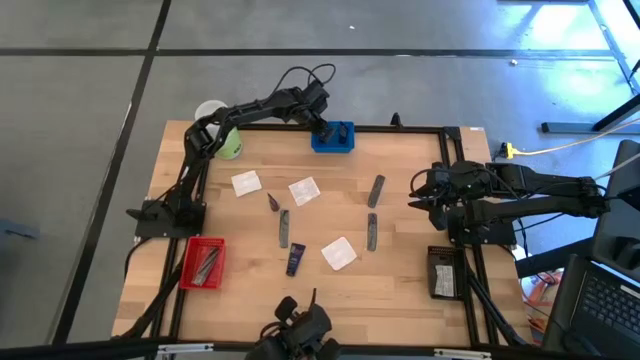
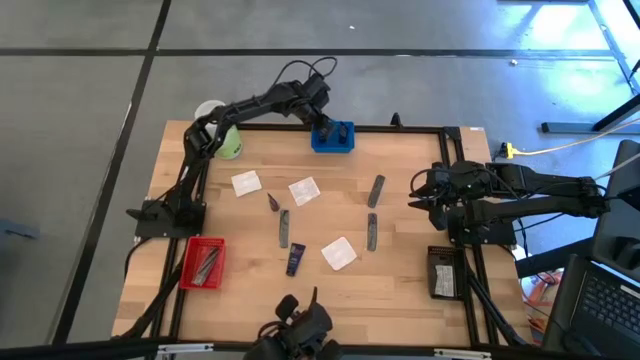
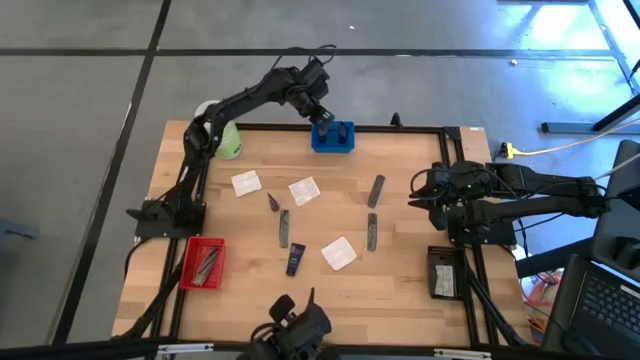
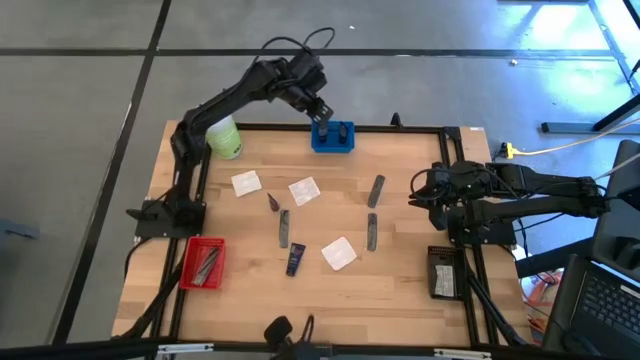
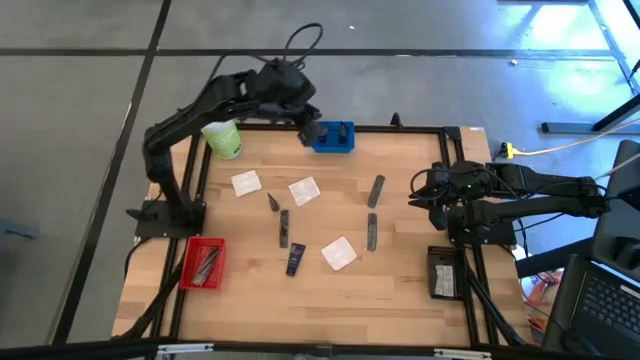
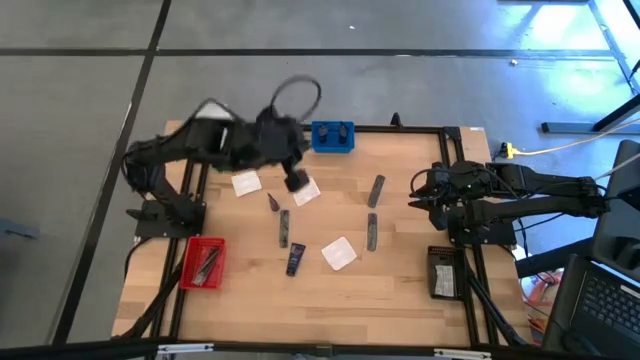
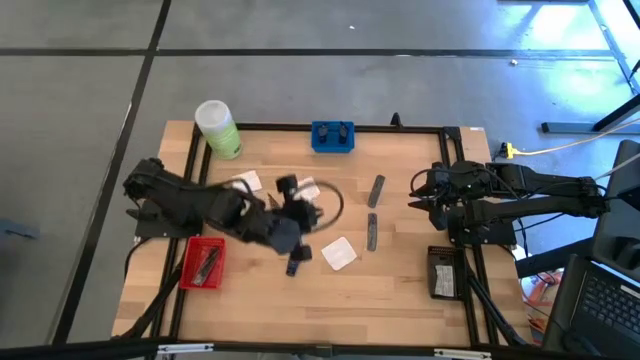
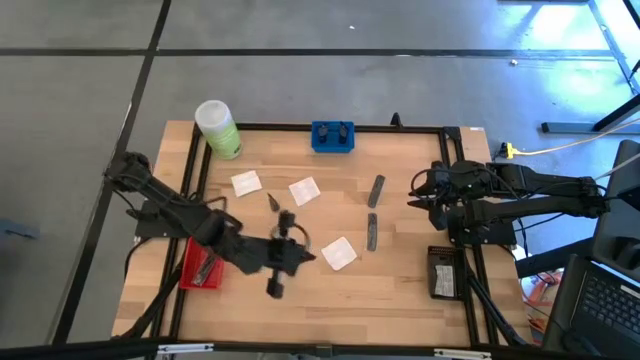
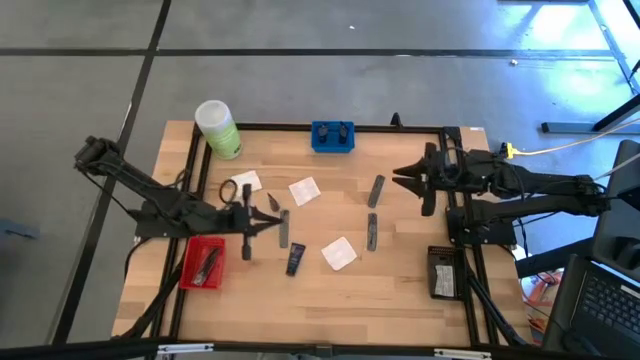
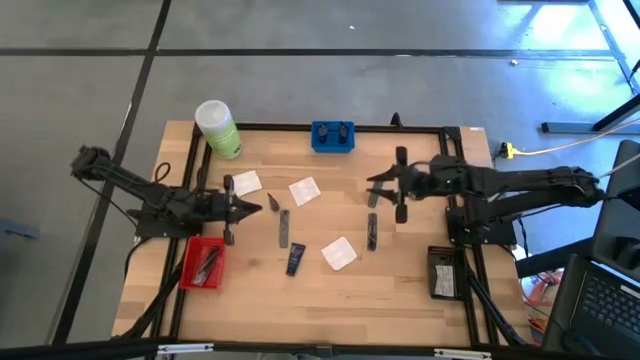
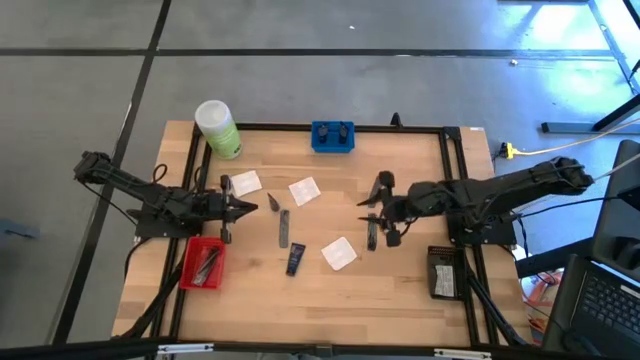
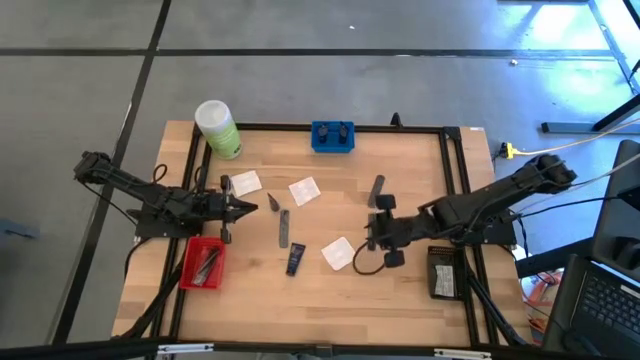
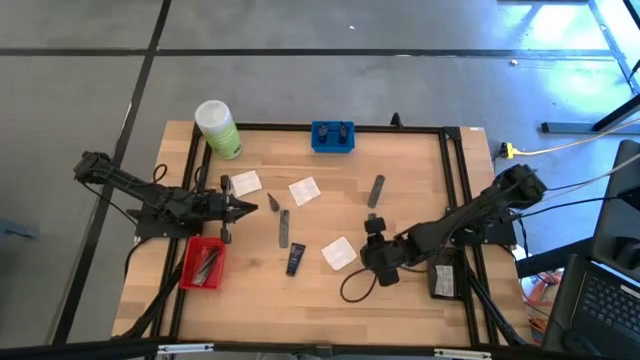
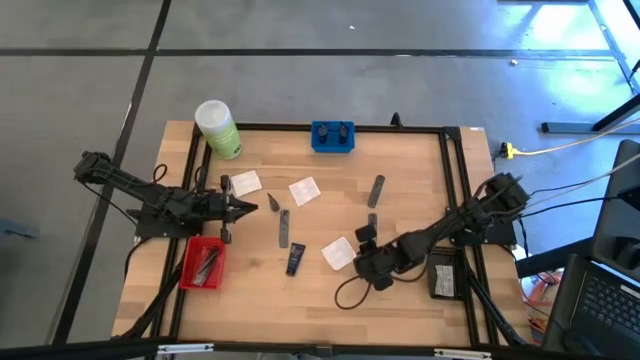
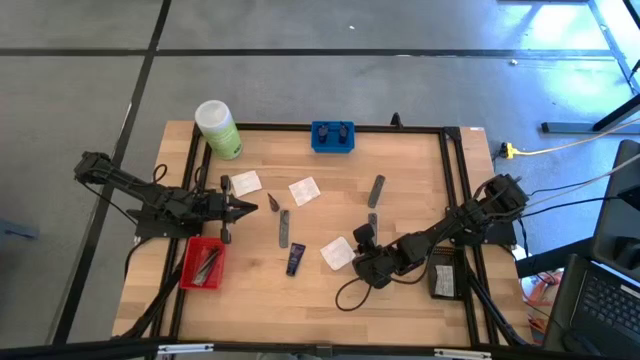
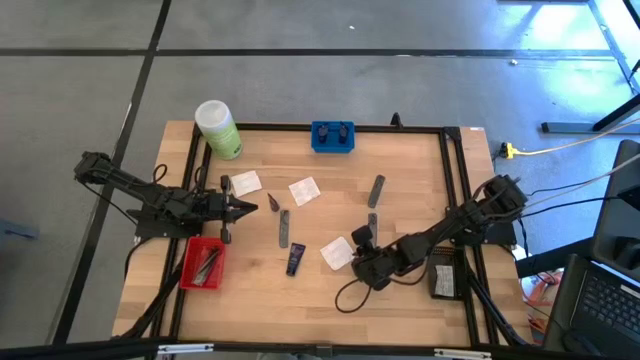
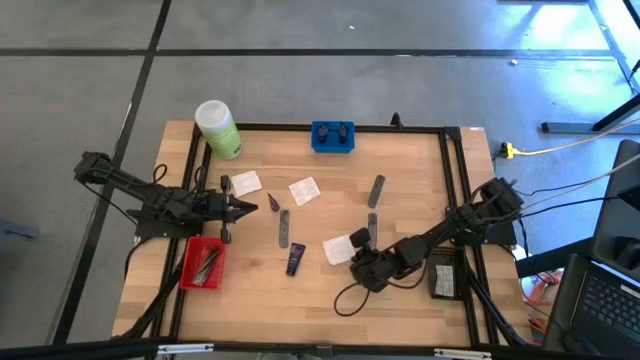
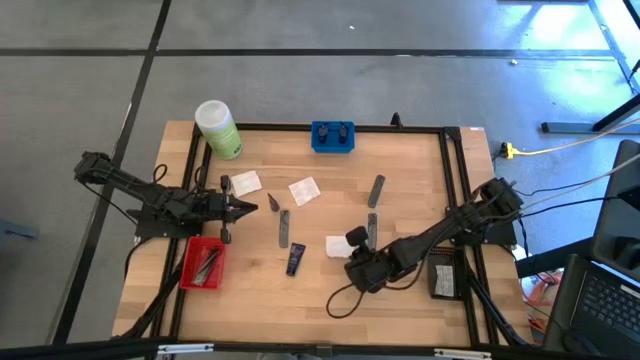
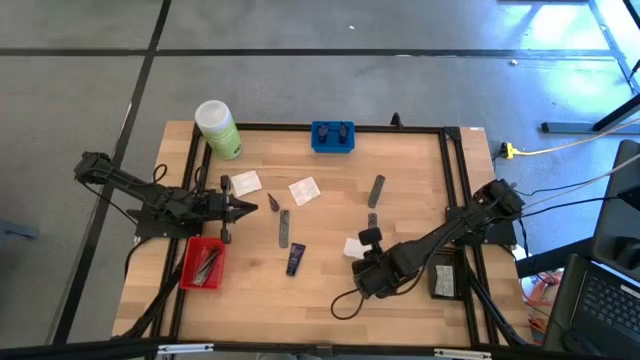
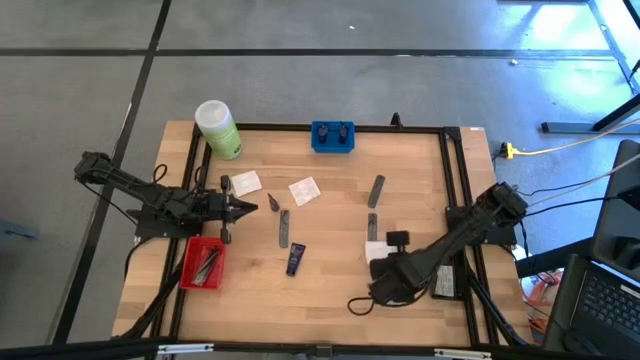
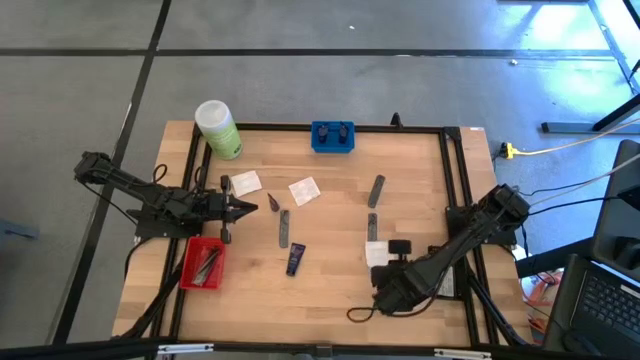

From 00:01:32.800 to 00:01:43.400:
Task: Pick & Place Travel size toiletries
Put the white bandage pad into the black basket

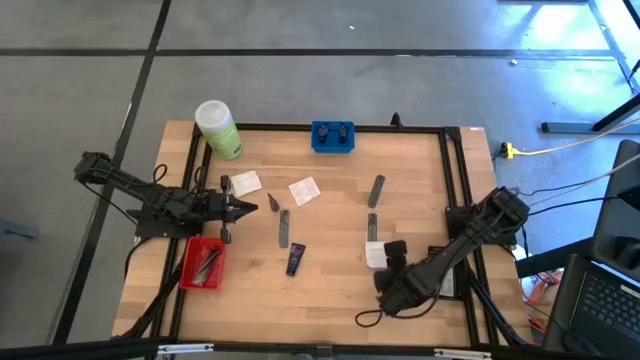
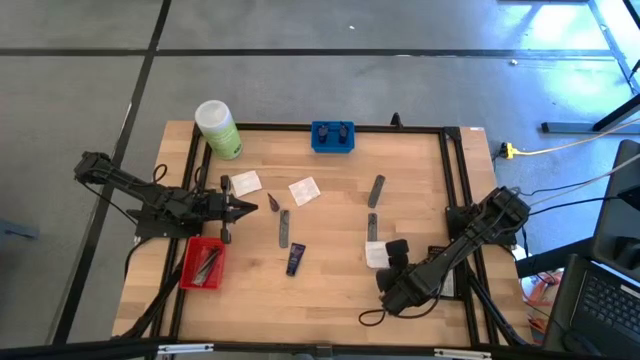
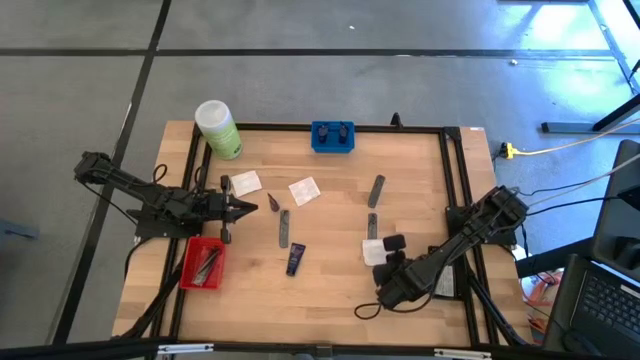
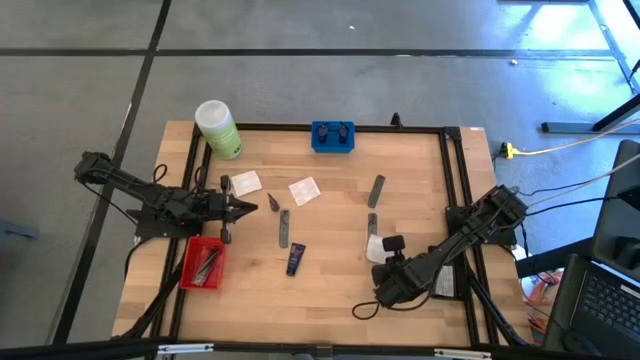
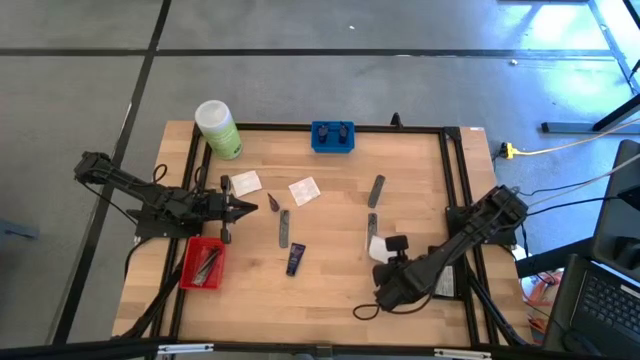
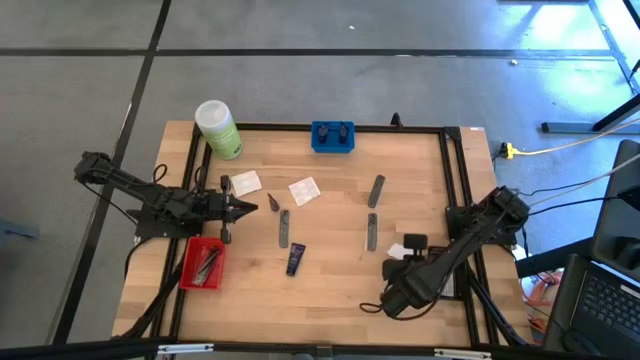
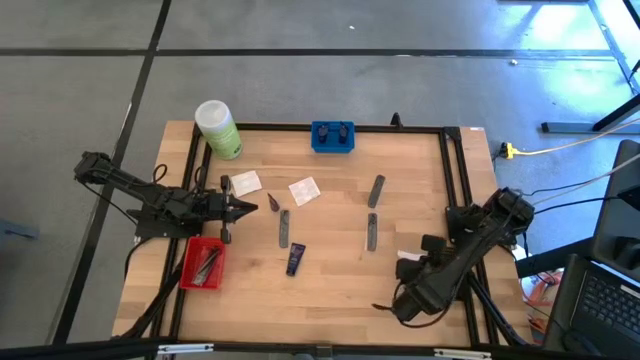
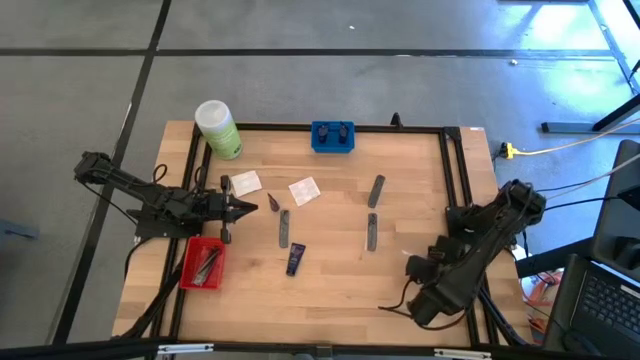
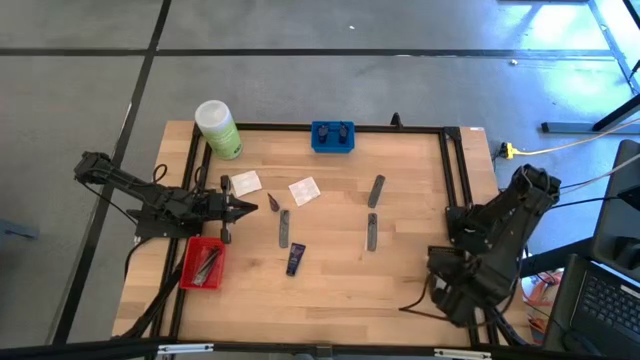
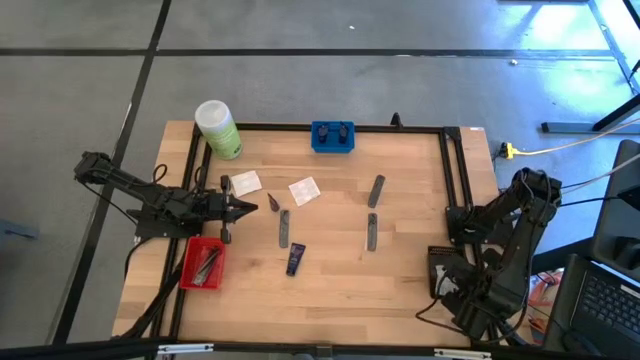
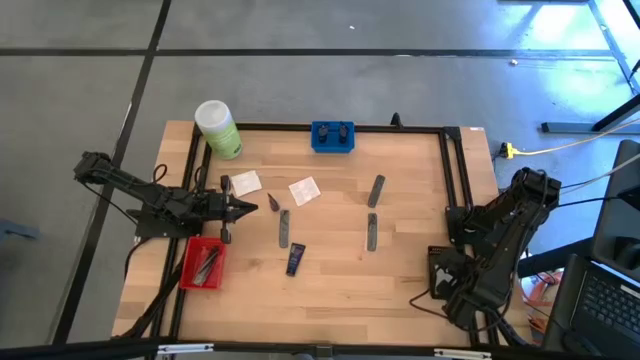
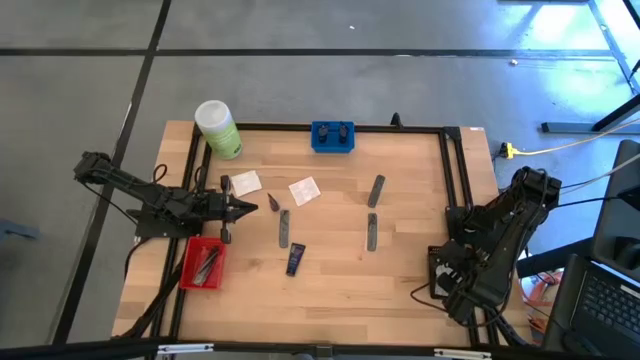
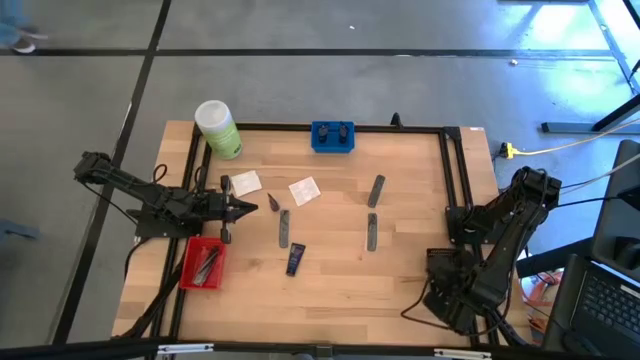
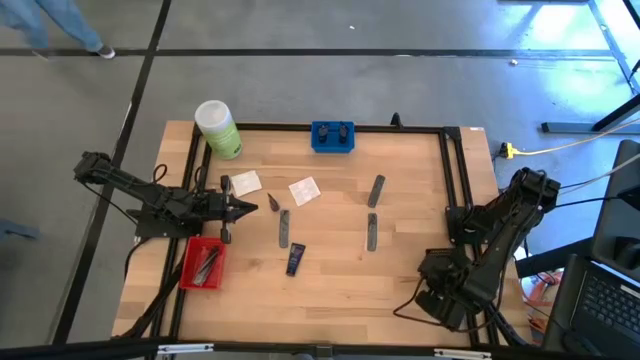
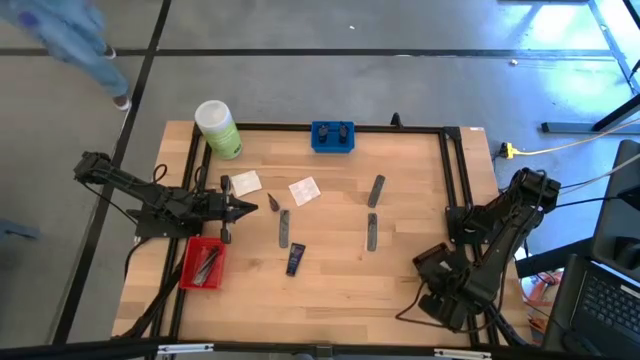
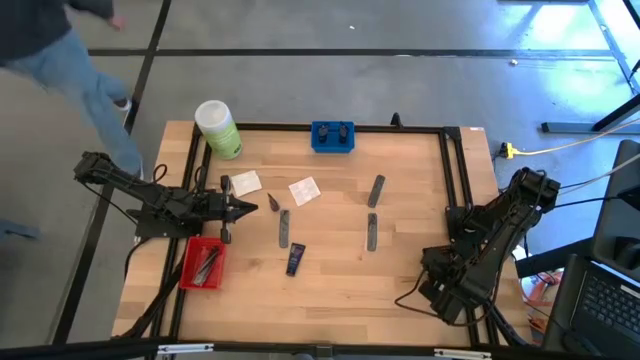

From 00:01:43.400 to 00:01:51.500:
Put the white bandage pad into the black basket
